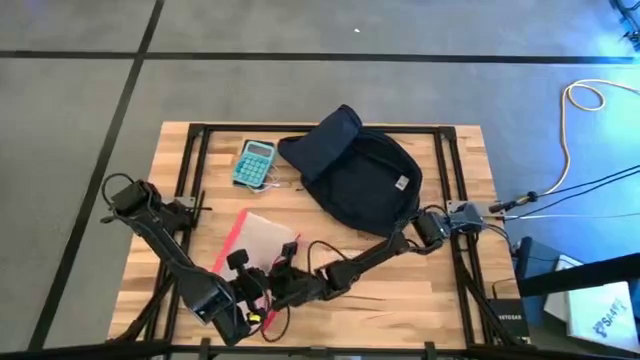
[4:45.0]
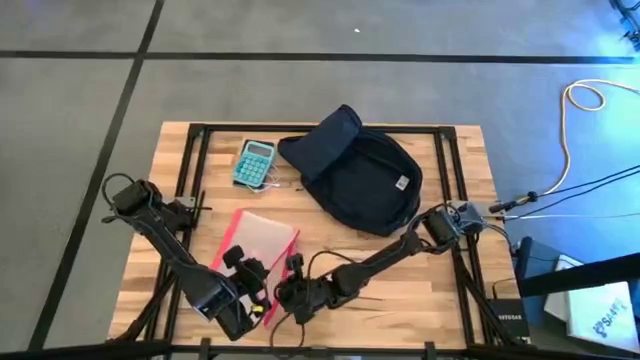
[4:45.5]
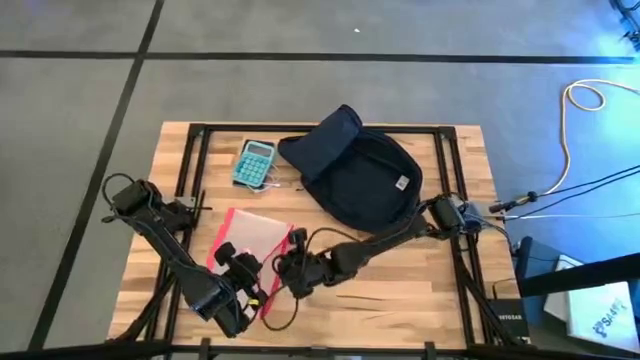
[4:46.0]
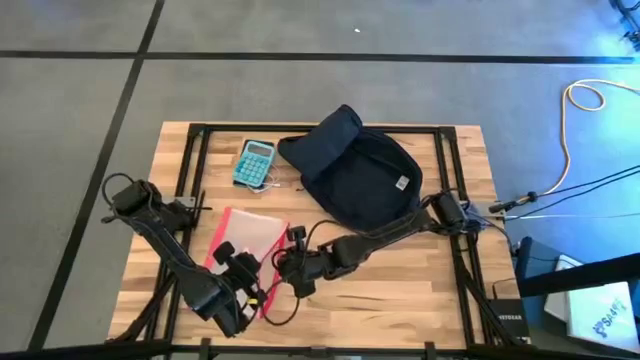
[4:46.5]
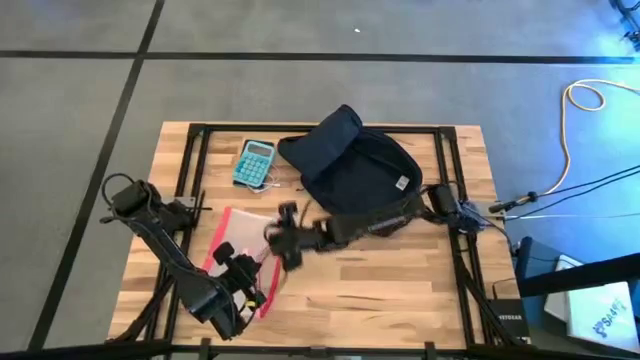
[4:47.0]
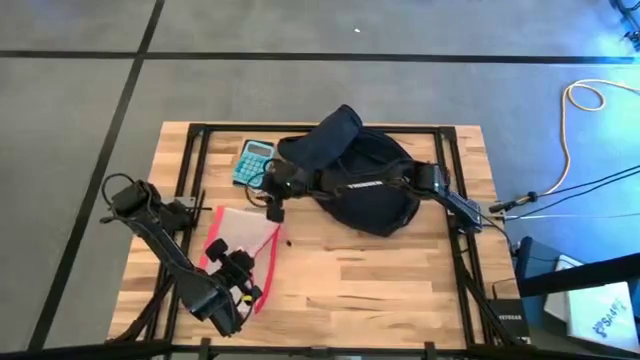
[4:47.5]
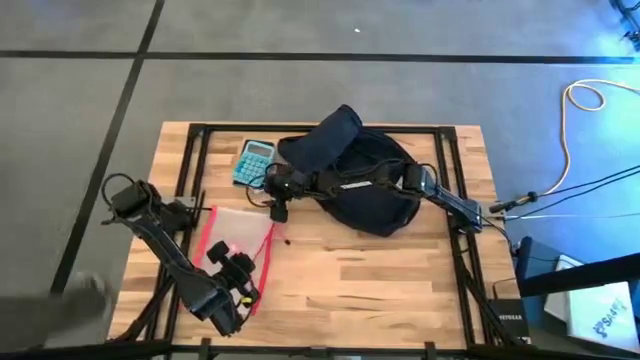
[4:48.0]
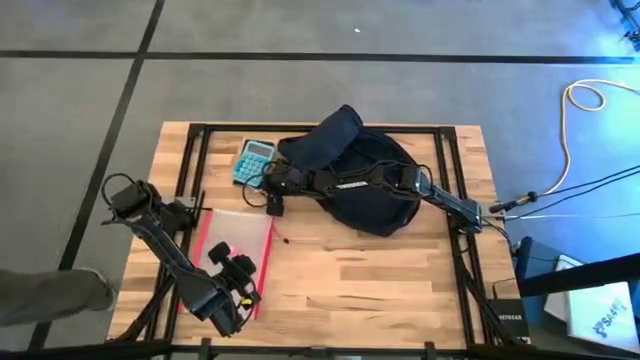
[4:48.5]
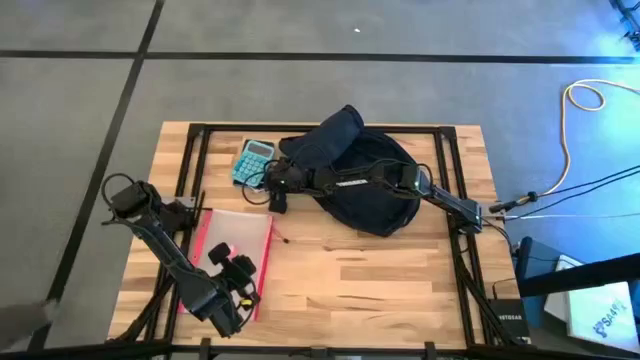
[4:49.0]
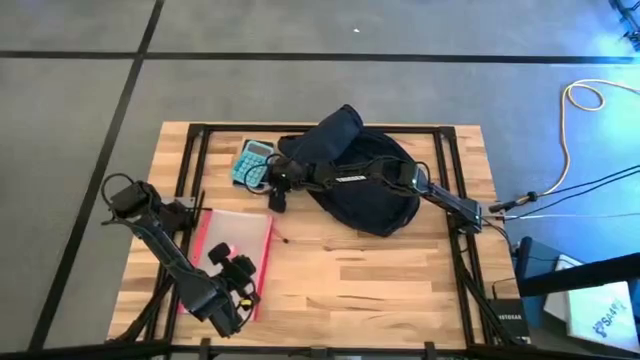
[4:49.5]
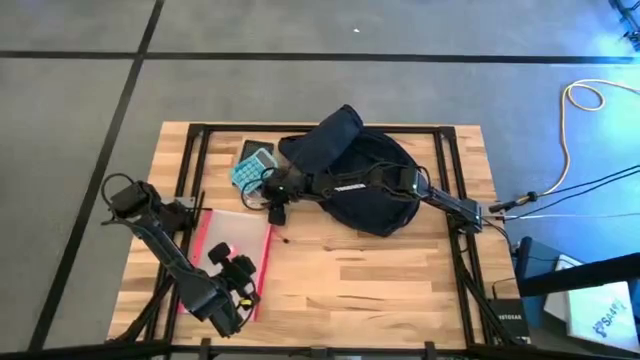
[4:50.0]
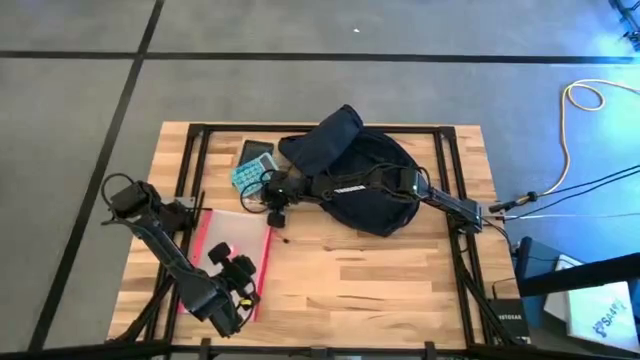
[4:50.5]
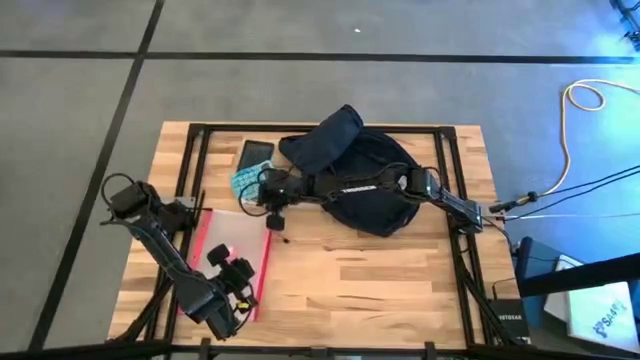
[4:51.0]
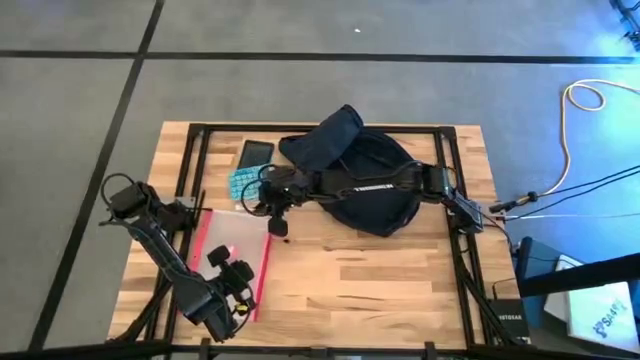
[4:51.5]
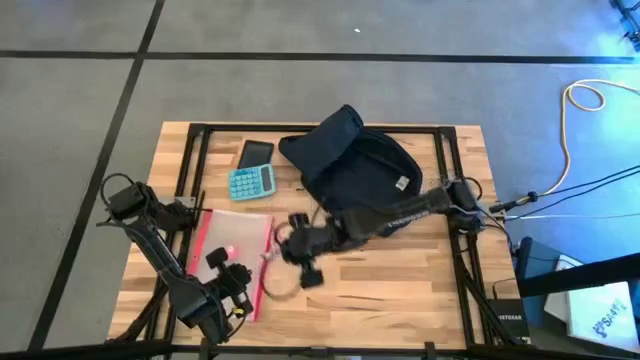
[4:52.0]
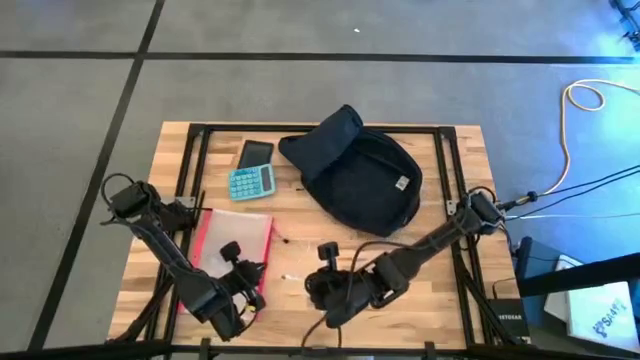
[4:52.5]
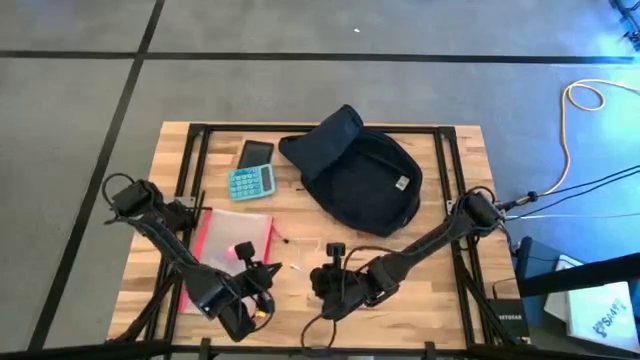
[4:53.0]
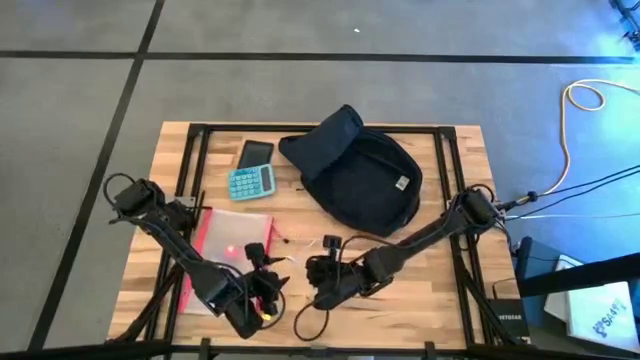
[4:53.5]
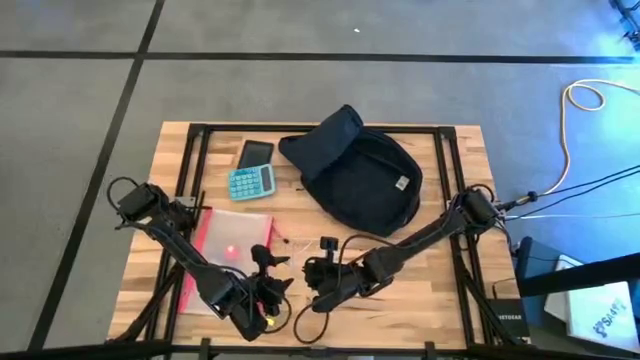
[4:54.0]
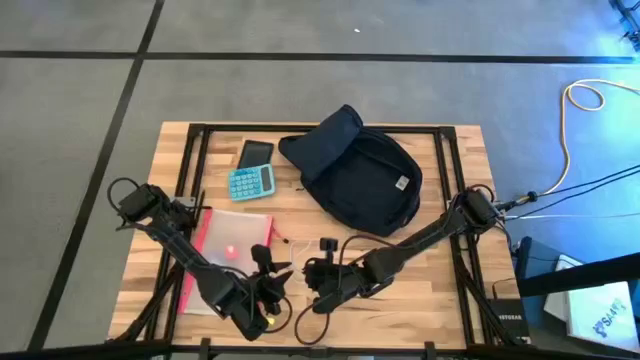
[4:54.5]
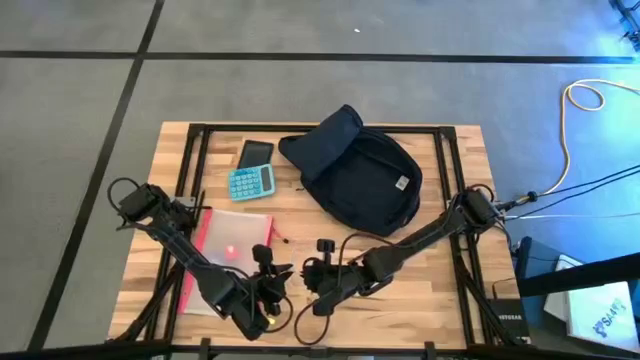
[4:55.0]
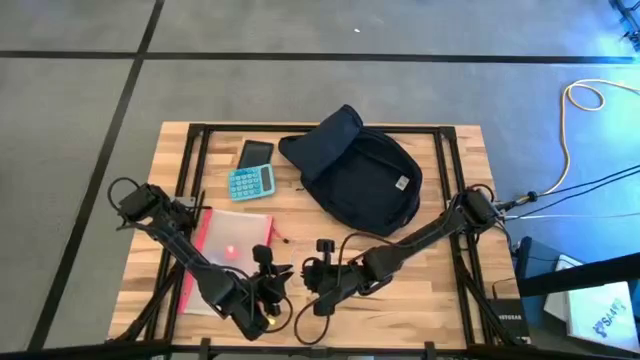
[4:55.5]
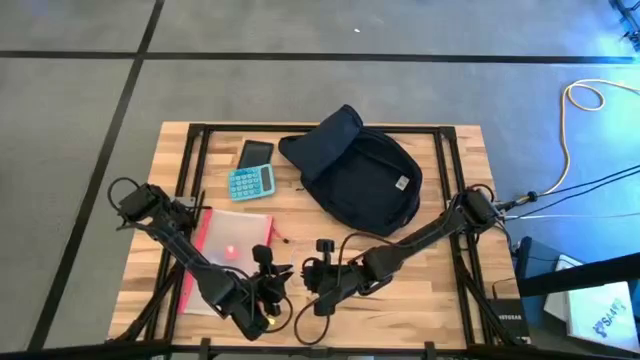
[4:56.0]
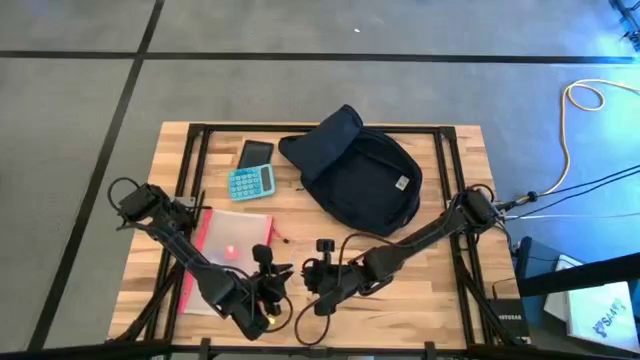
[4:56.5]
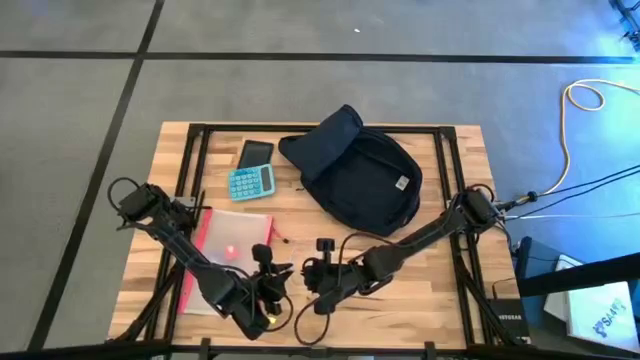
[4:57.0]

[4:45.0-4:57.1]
Task: Unpack backpack
Put the white charger cable into the transparent zip bag

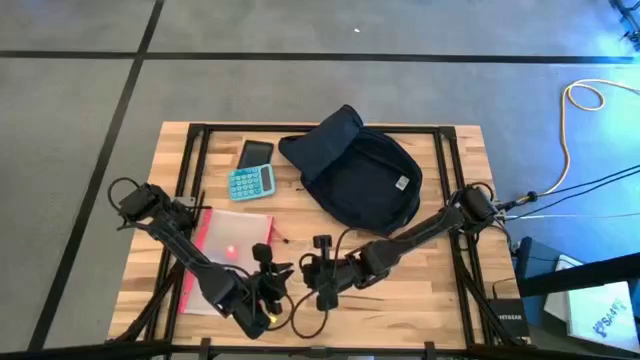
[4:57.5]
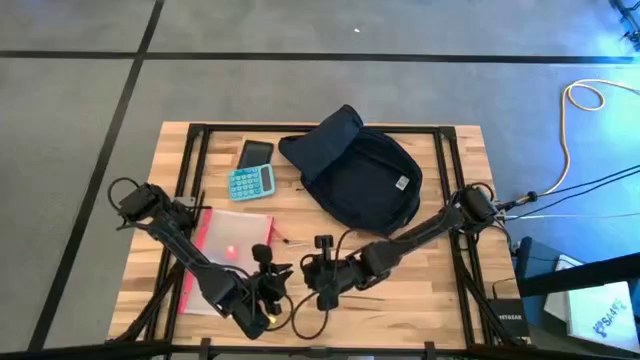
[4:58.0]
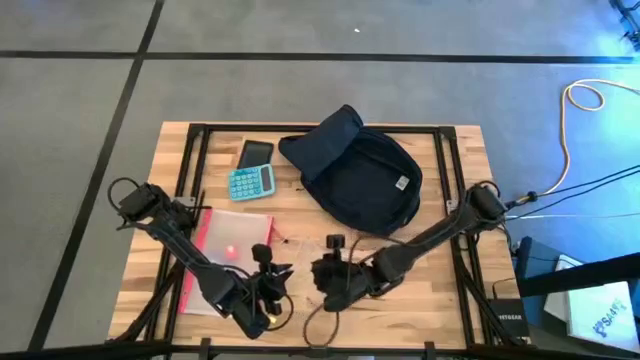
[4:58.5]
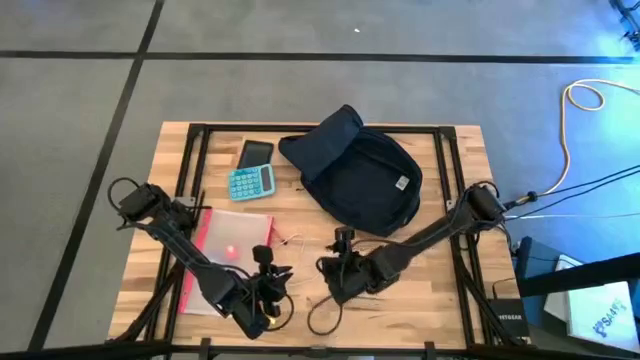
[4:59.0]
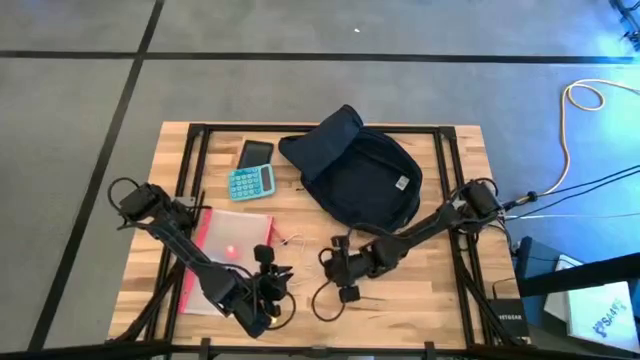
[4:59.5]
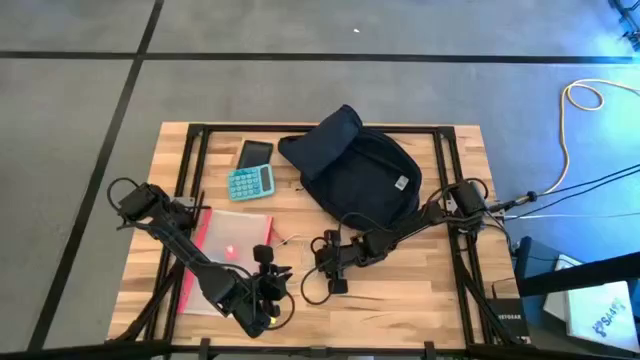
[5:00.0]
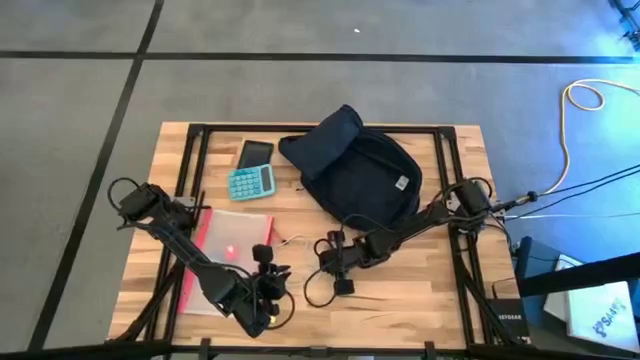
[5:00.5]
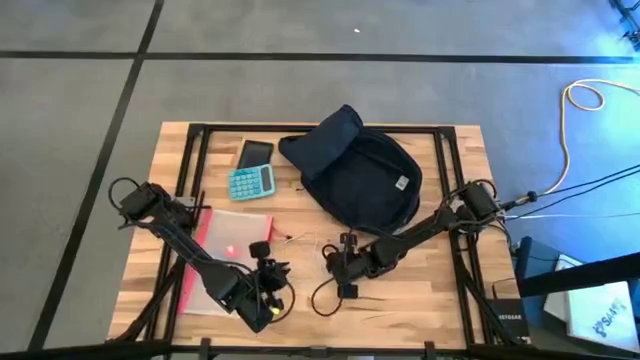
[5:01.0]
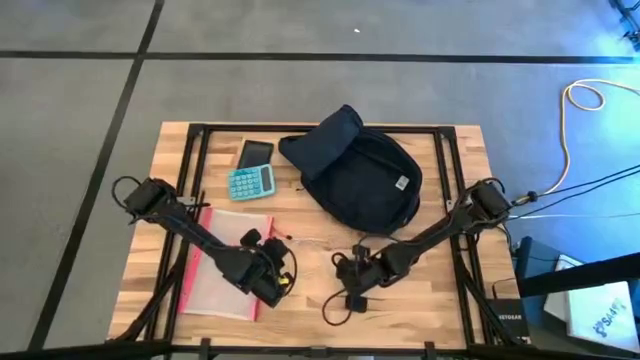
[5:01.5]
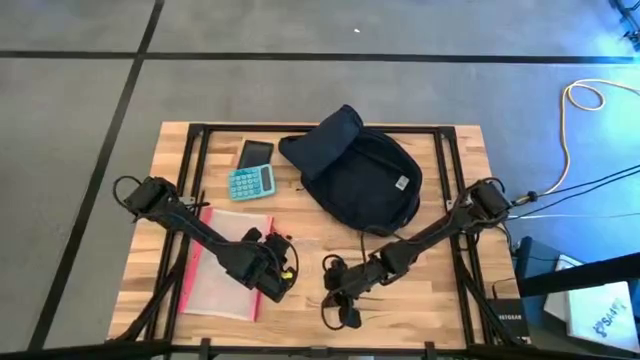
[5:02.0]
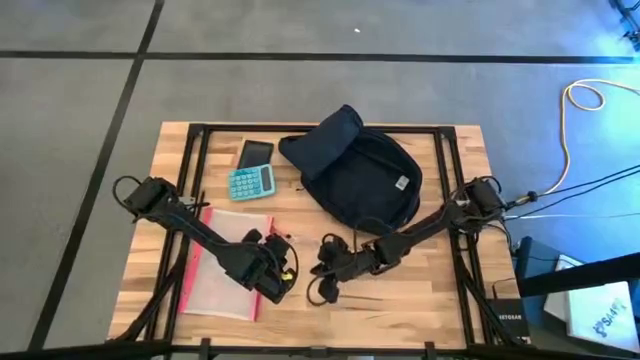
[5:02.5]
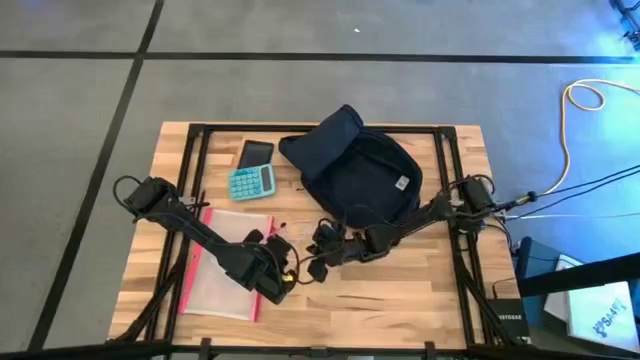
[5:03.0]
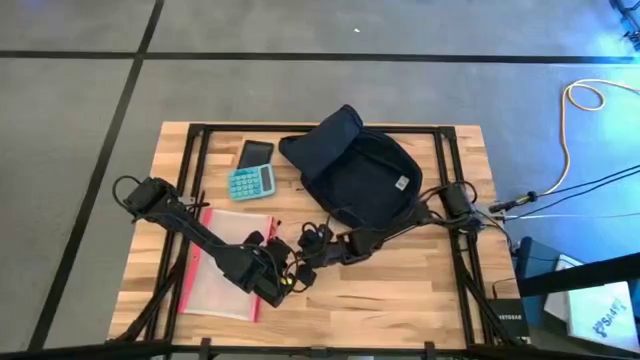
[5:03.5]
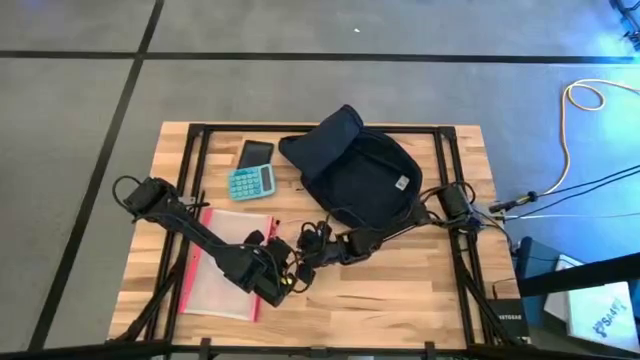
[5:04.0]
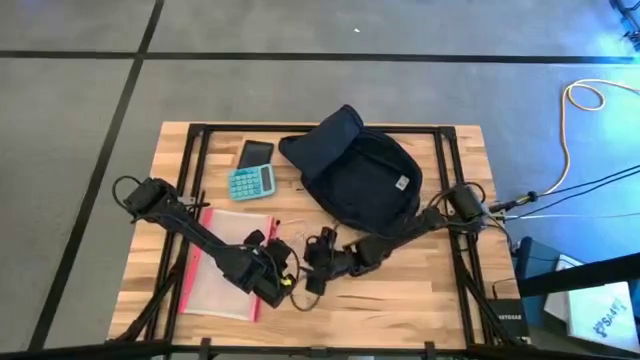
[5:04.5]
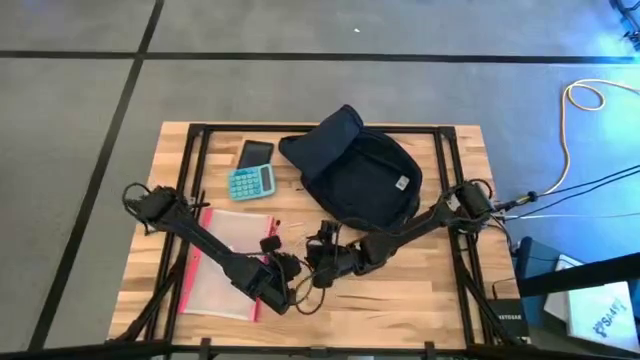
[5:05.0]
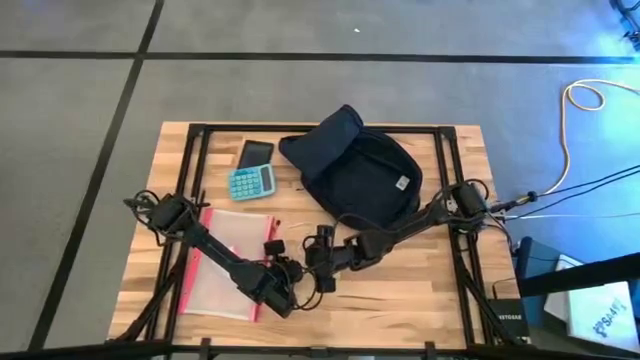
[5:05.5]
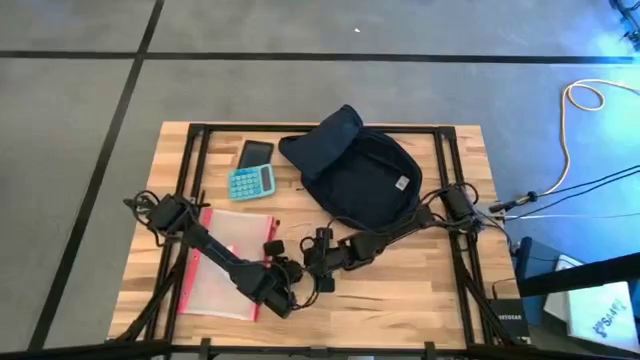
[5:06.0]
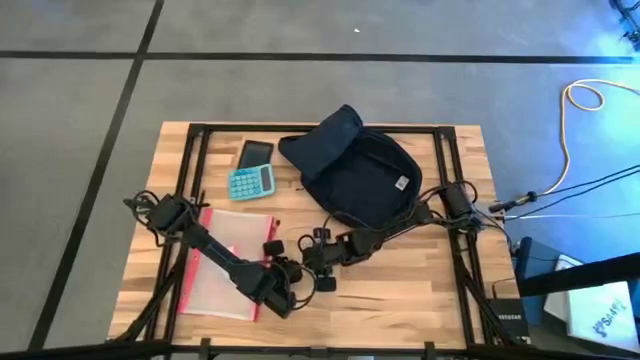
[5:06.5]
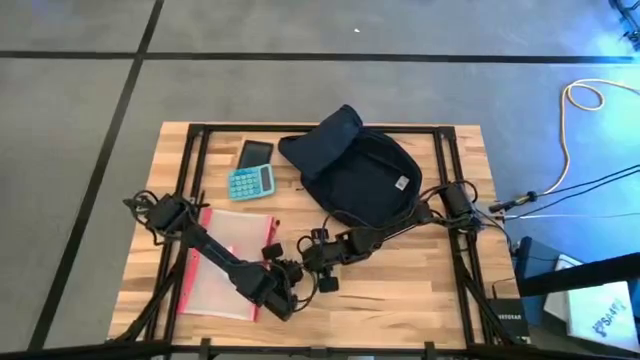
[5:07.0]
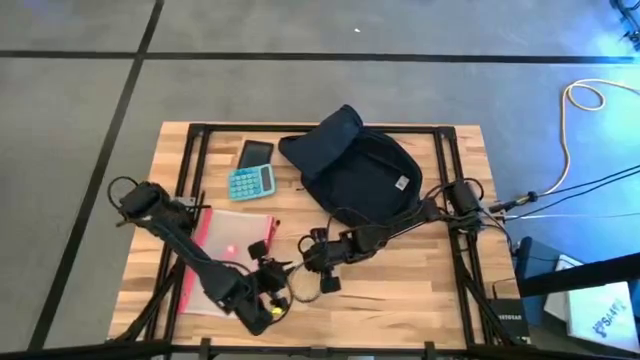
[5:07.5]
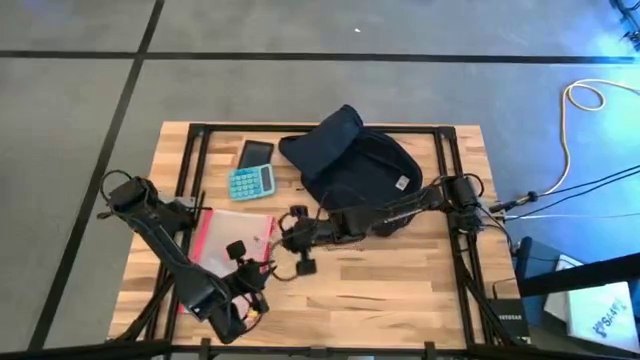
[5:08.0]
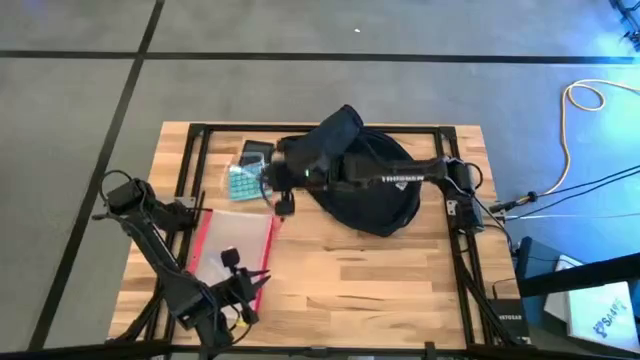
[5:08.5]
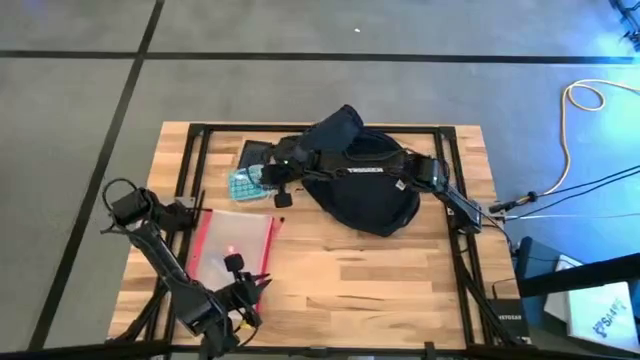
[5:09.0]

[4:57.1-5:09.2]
Put the white charger cable into the transparent zip bag
